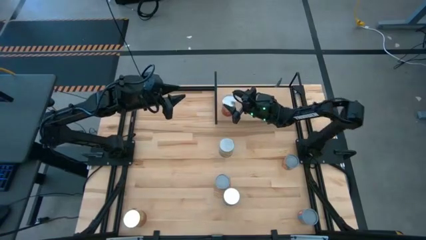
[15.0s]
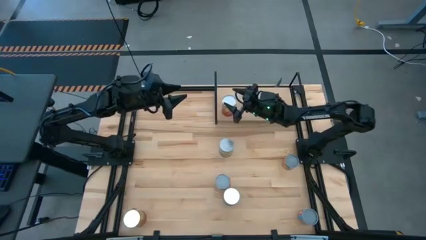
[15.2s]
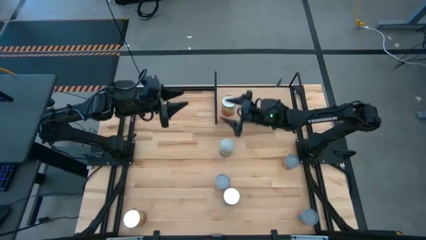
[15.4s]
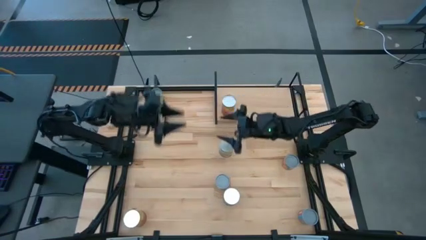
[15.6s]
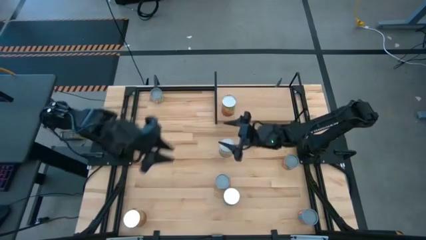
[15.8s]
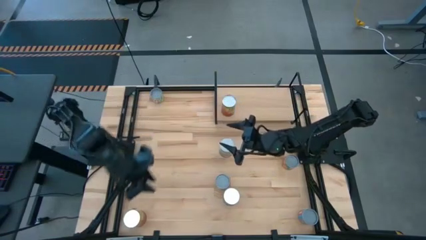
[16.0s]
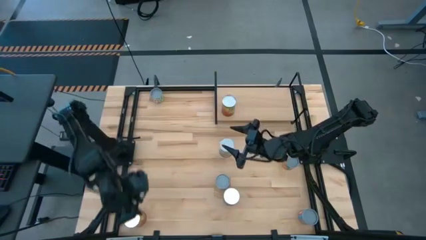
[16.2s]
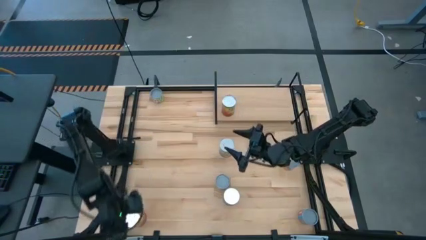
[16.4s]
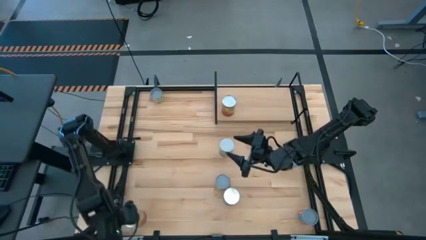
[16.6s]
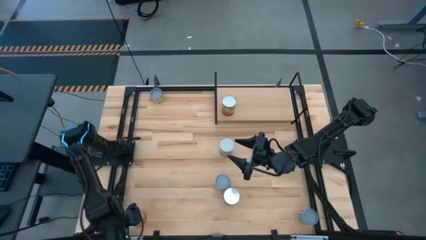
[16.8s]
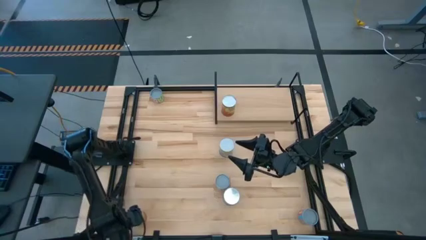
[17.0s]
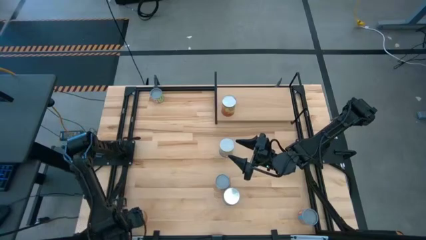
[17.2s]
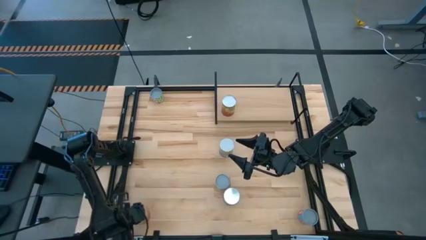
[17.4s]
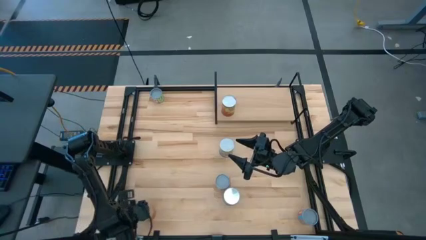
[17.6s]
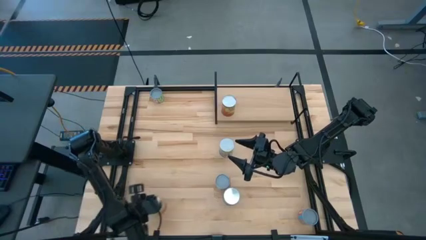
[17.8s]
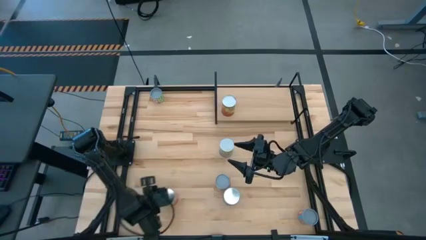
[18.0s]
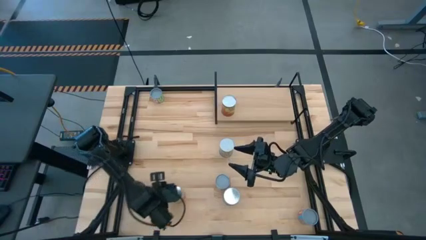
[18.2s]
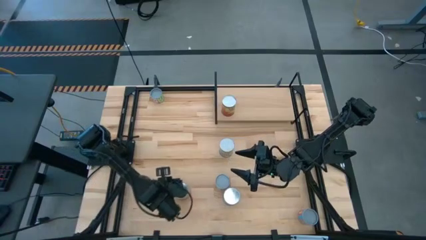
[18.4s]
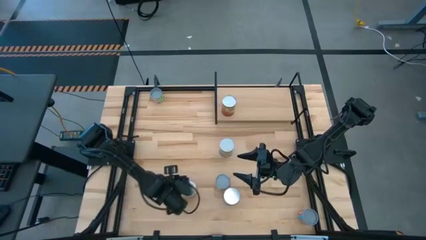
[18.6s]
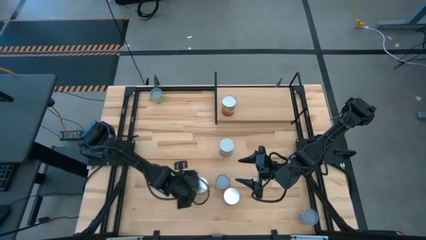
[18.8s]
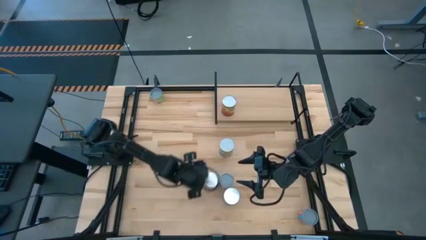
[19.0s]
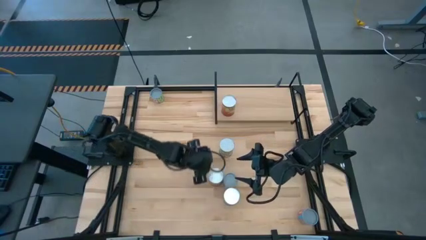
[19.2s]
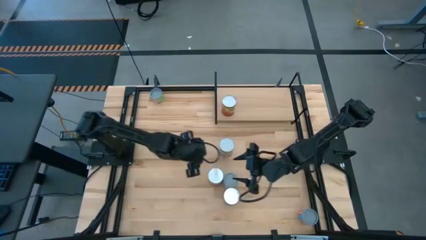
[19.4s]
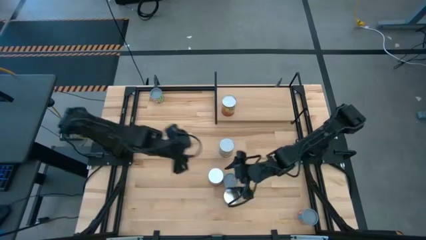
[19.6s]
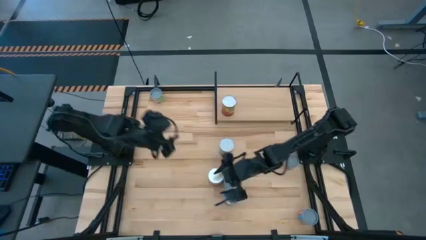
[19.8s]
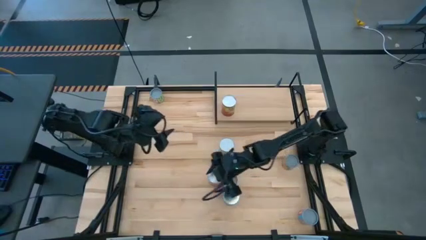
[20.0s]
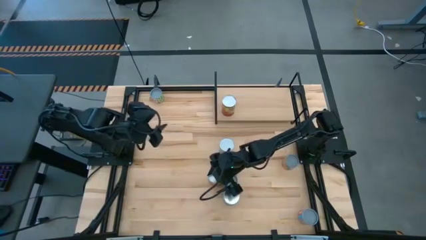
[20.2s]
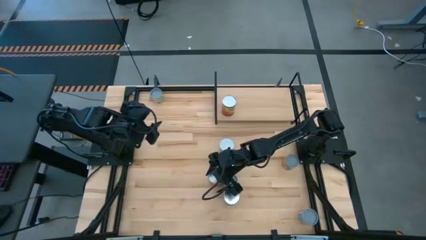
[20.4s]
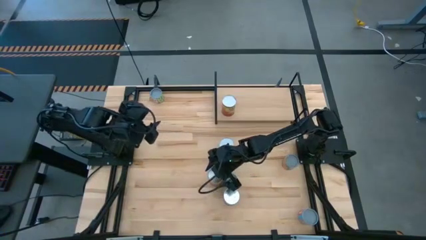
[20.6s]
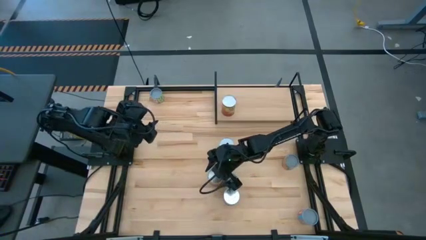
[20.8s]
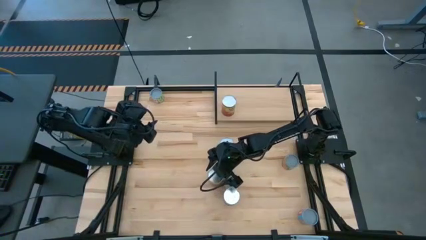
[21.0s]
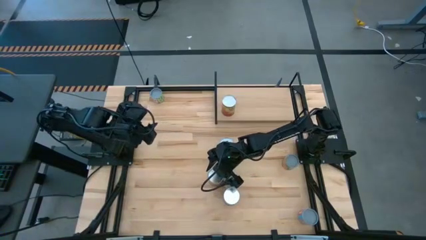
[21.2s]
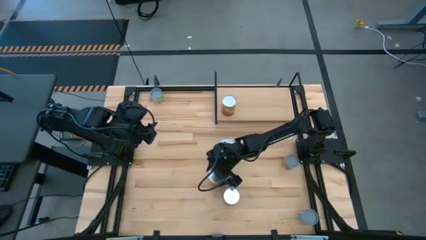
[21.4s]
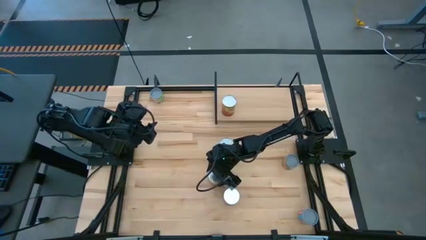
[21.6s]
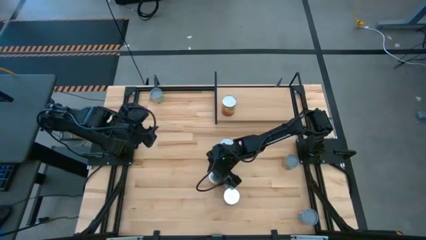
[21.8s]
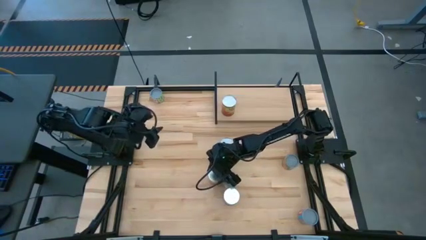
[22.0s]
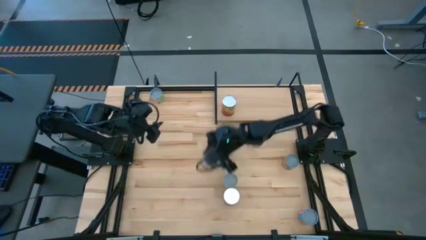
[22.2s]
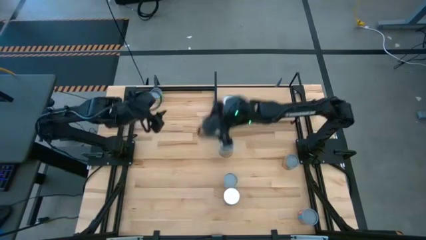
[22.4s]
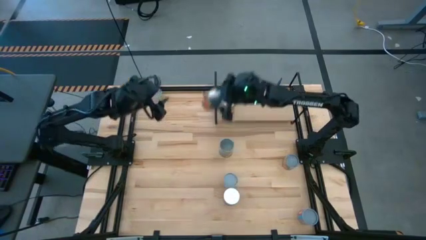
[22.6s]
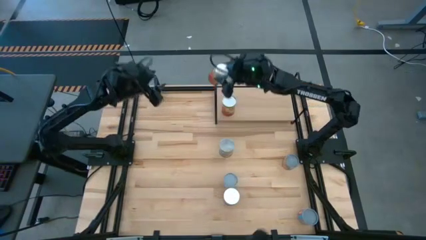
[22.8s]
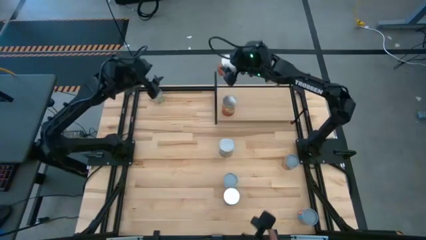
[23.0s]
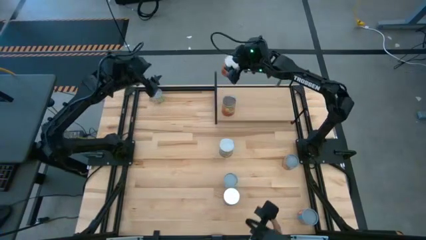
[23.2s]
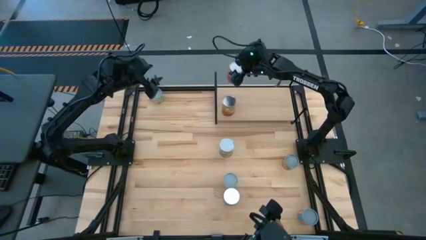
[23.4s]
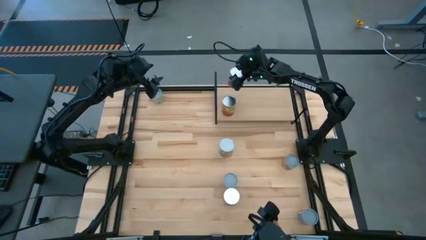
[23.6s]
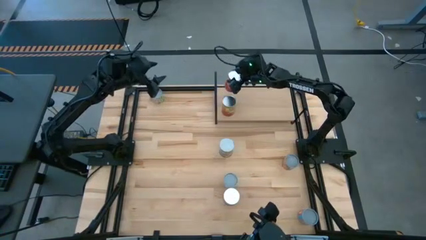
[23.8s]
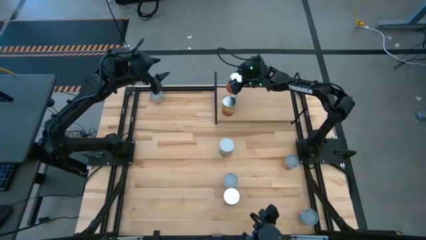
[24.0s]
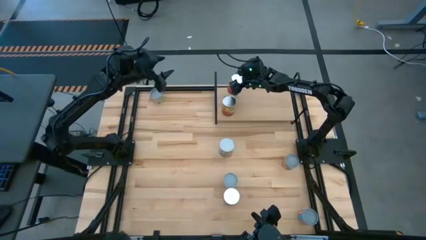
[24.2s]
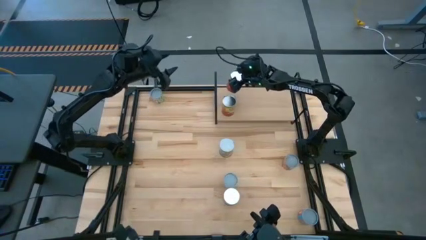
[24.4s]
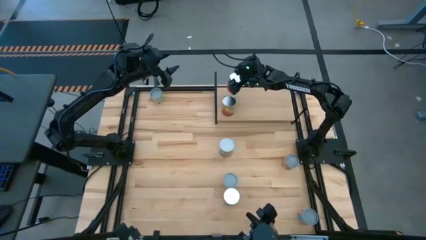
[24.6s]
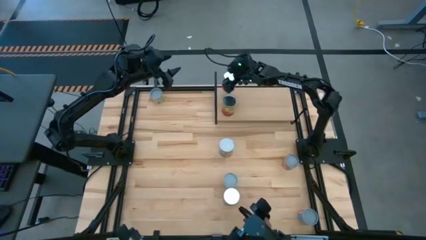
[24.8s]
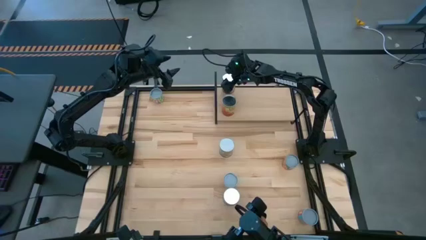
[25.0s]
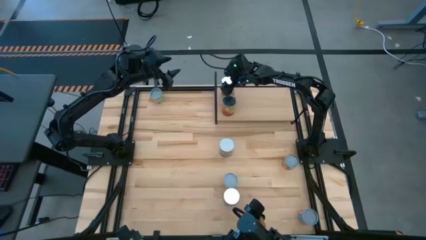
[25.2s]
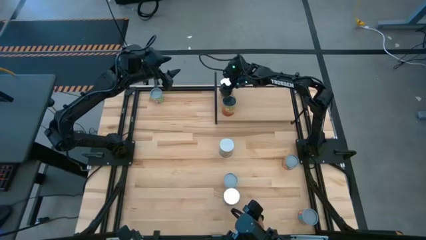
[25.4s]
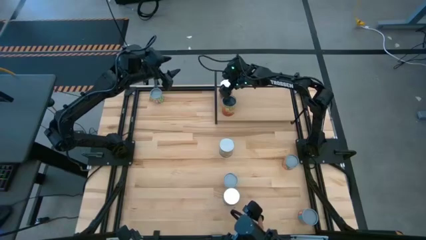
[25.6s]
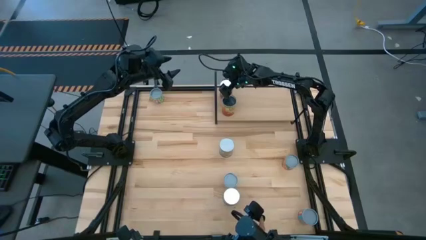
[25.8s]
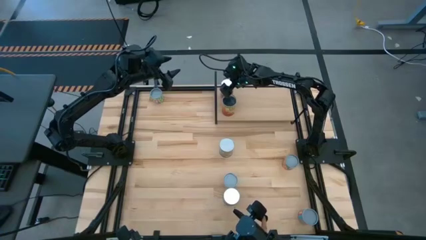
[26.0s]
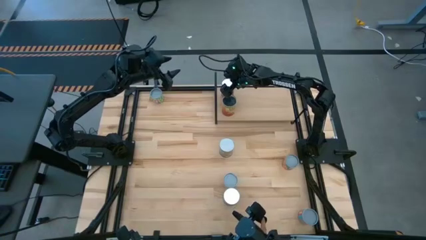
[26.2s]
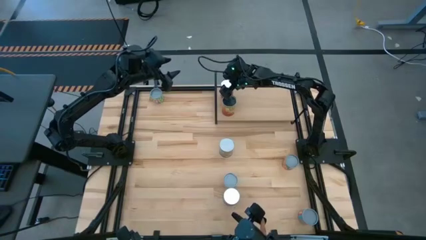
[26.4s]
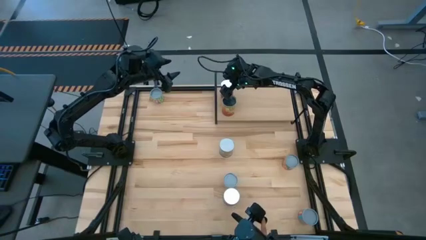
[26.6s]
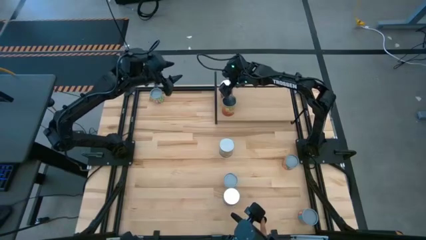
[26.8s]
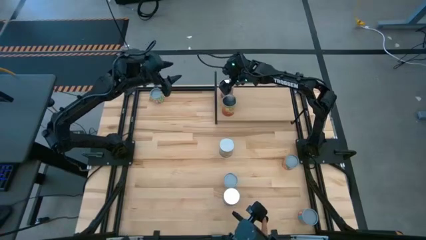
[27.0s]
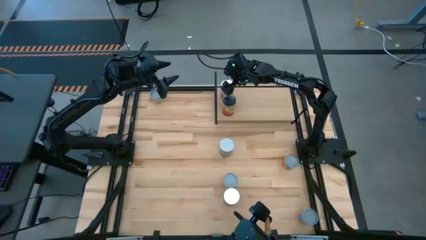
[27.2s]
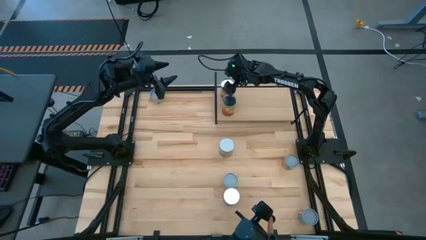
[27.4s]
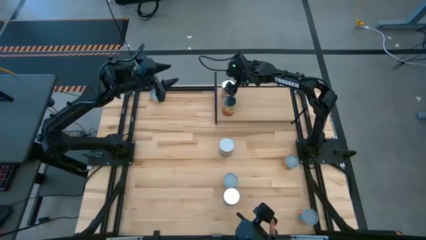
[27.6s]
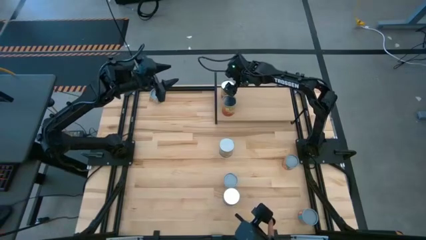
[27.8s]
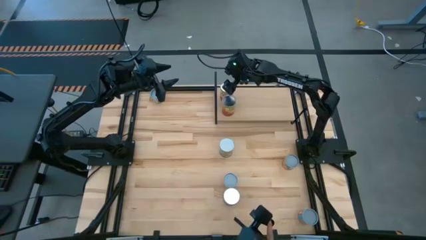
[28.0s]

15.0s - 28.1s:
Task: Pick and place cans onto a shelf
Put the large canned corn and aligned with the other canned corn on the shelf

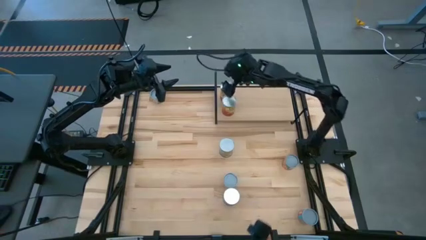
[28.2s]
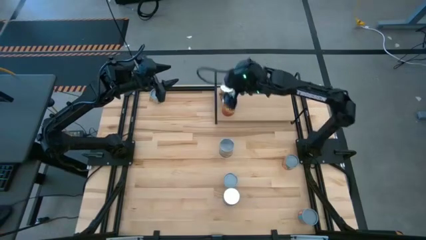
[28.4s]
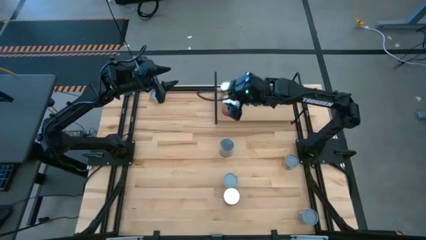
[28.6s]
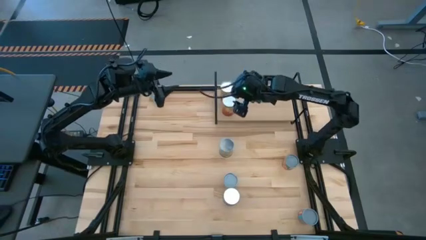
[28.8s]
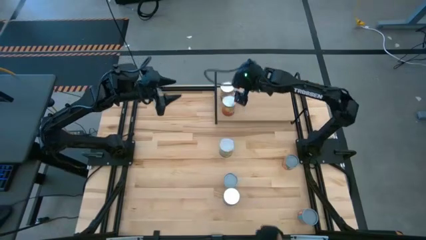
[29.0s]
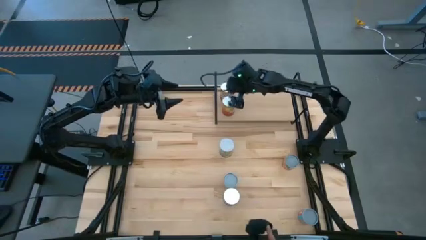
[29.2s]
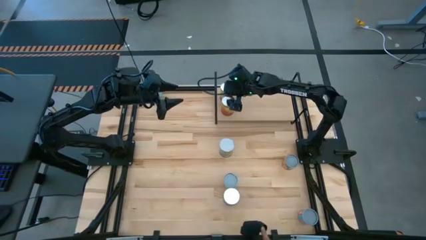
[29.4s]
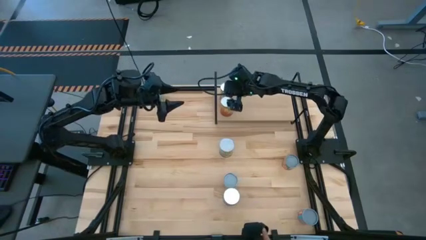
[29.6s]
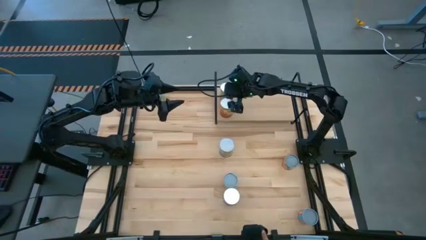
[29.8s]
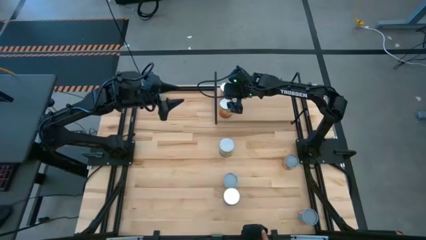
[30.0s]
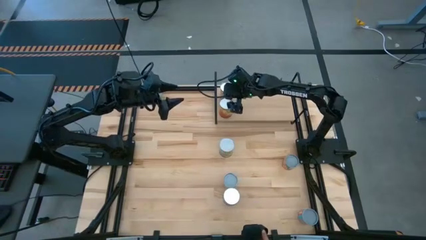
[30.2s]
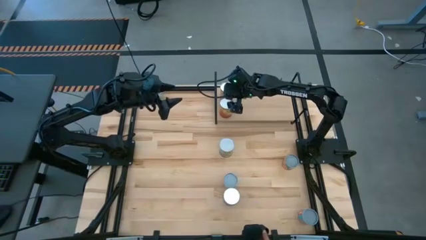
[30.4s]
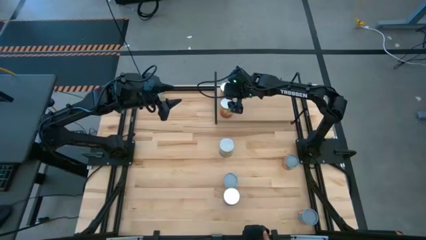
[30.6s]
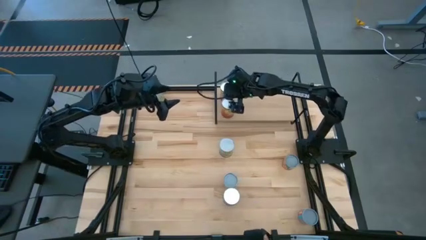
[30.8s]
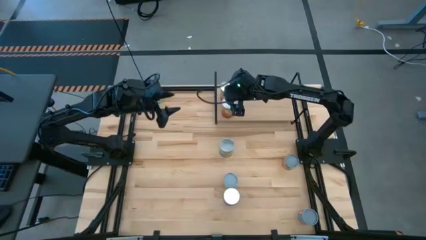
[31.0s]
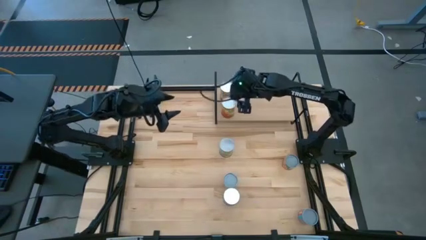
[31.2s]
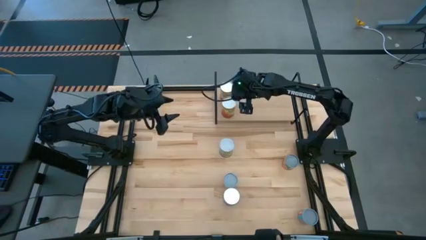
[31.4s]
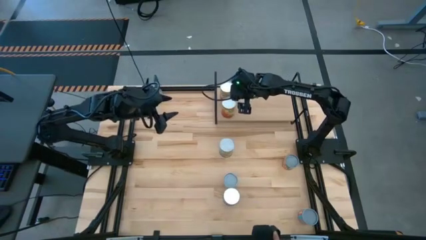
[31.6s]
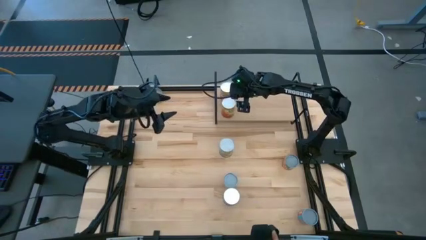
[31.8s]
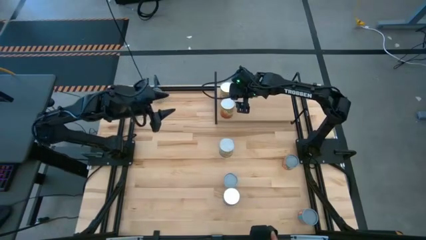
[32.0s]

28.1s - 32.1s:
Adjust the large canned corn on the shelf
